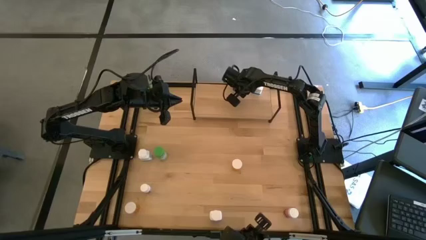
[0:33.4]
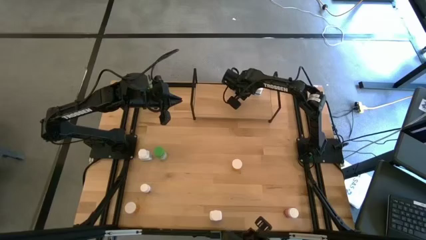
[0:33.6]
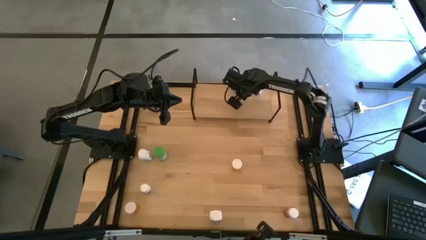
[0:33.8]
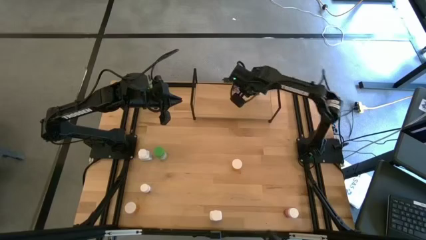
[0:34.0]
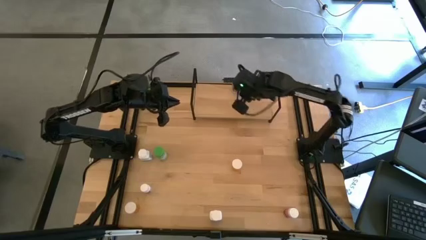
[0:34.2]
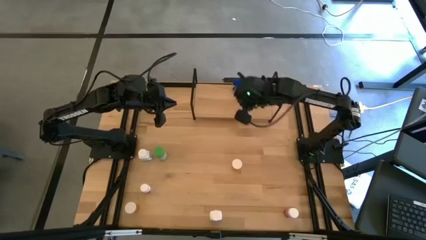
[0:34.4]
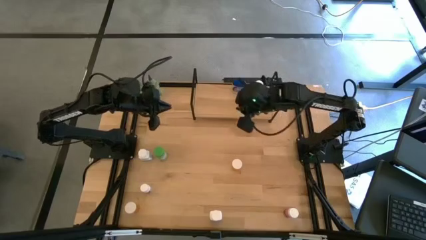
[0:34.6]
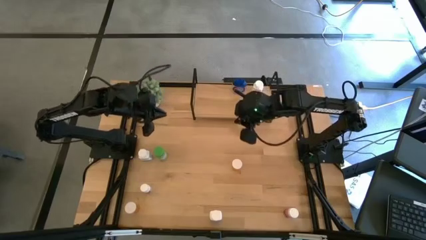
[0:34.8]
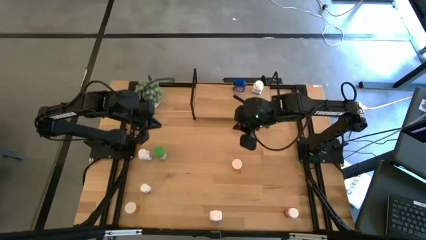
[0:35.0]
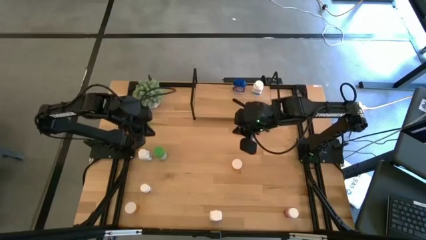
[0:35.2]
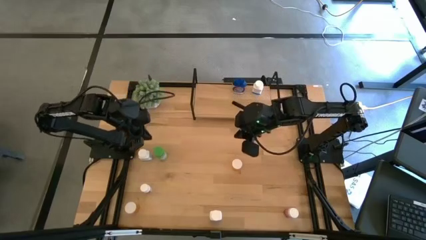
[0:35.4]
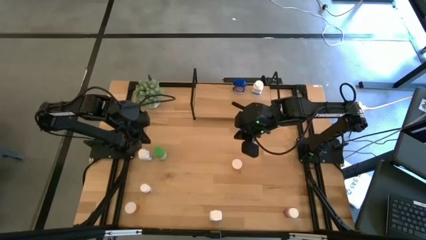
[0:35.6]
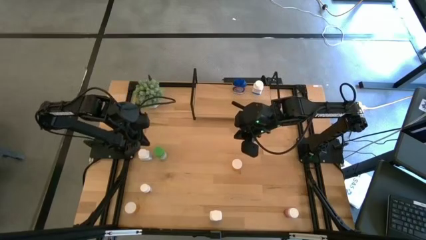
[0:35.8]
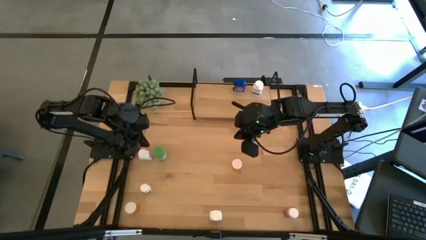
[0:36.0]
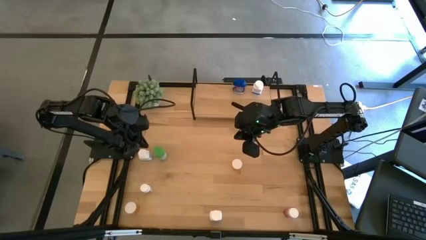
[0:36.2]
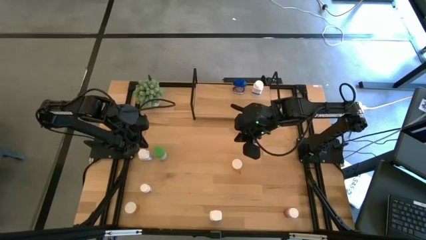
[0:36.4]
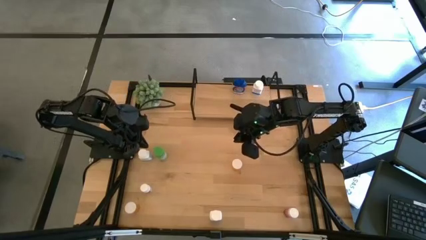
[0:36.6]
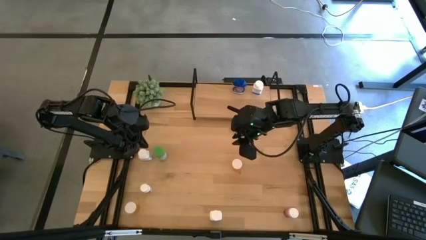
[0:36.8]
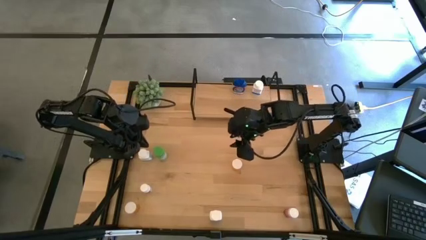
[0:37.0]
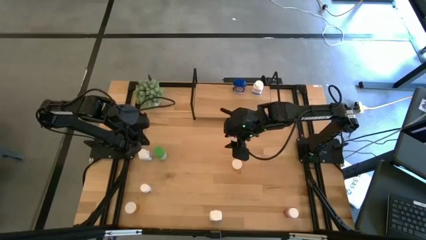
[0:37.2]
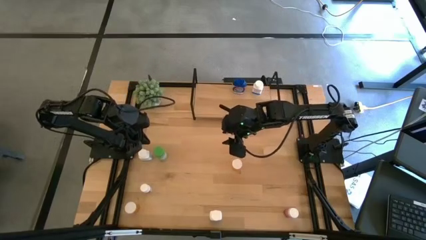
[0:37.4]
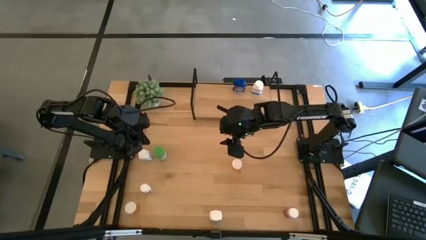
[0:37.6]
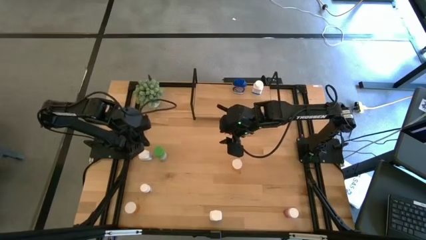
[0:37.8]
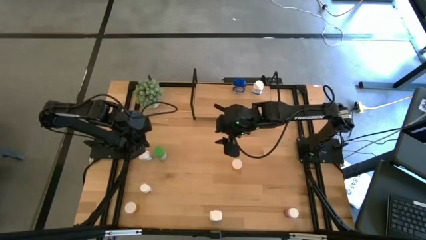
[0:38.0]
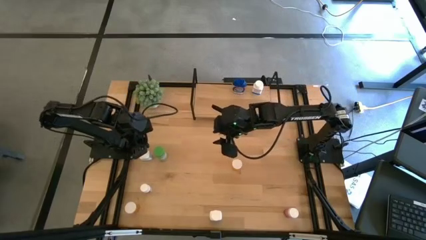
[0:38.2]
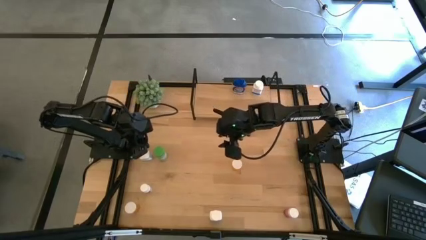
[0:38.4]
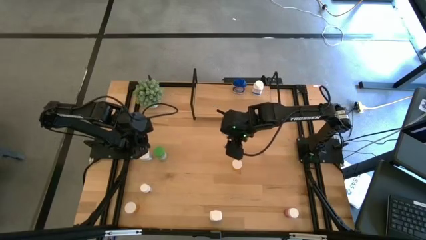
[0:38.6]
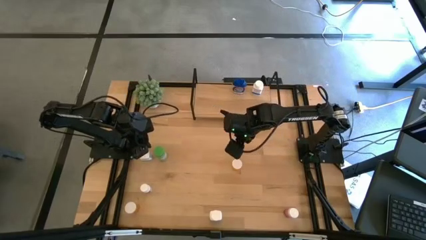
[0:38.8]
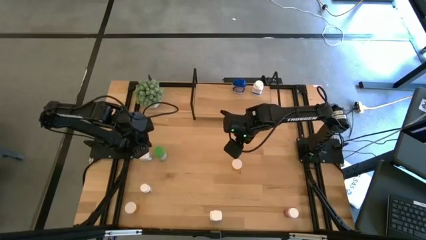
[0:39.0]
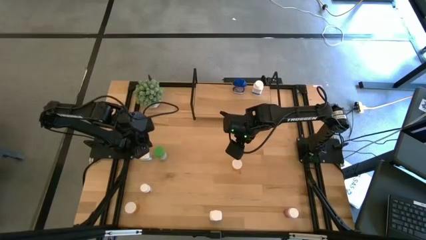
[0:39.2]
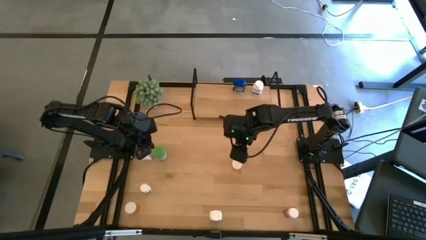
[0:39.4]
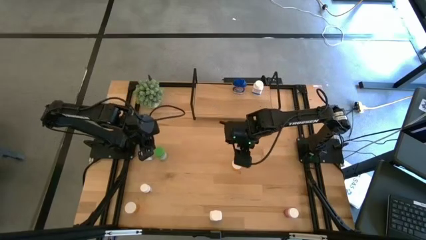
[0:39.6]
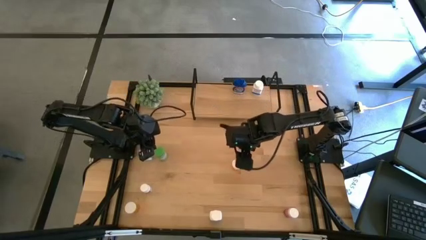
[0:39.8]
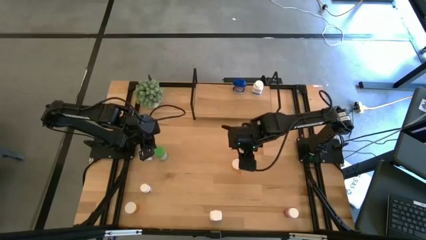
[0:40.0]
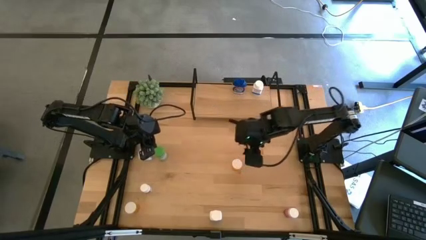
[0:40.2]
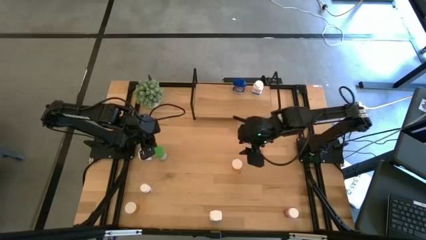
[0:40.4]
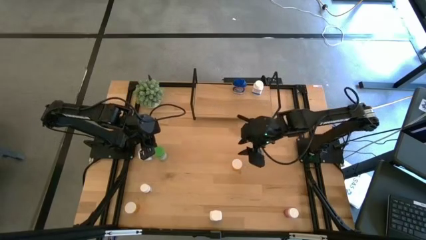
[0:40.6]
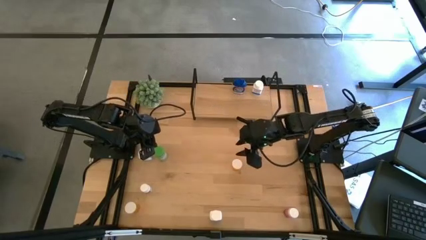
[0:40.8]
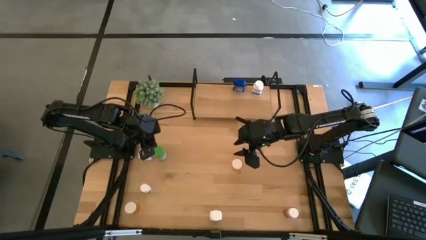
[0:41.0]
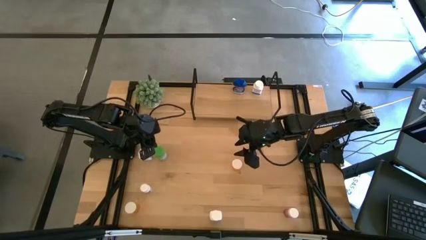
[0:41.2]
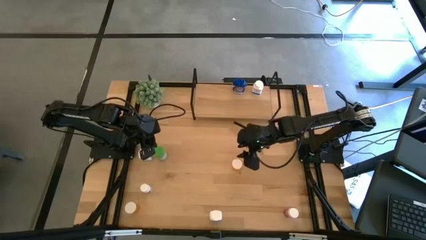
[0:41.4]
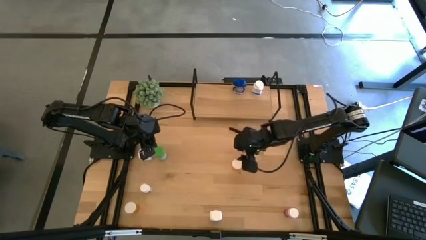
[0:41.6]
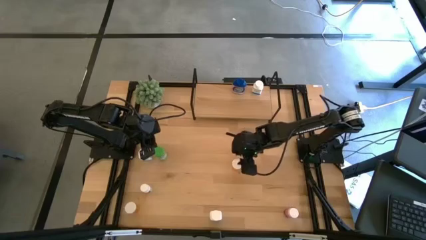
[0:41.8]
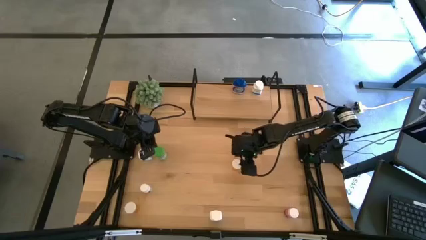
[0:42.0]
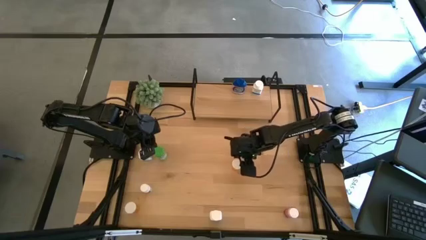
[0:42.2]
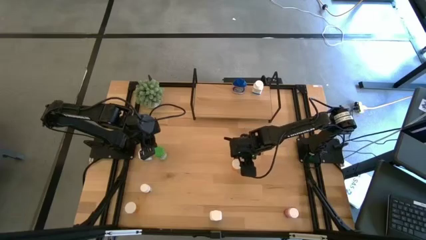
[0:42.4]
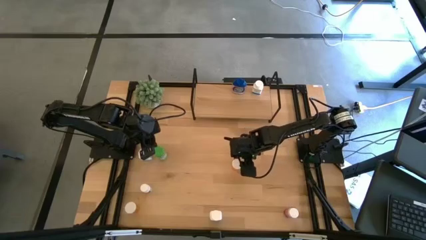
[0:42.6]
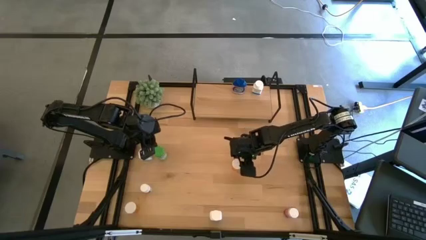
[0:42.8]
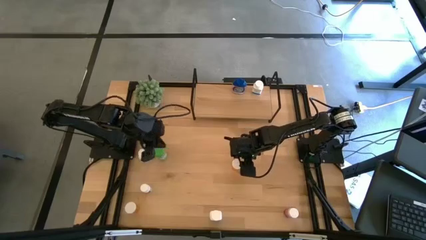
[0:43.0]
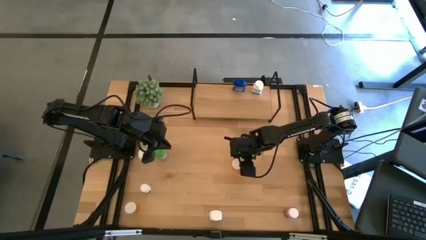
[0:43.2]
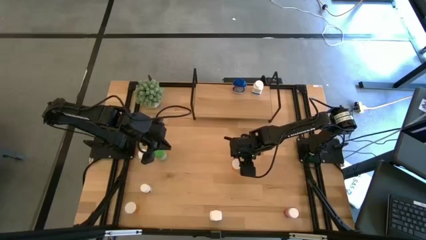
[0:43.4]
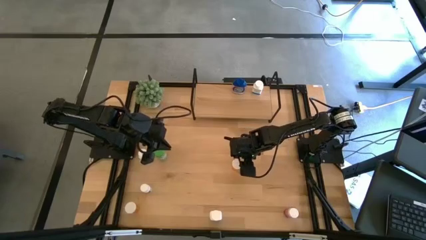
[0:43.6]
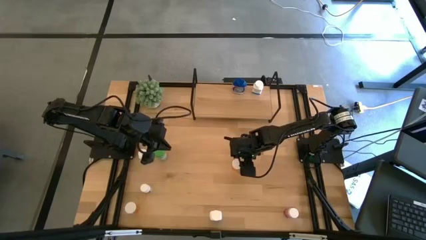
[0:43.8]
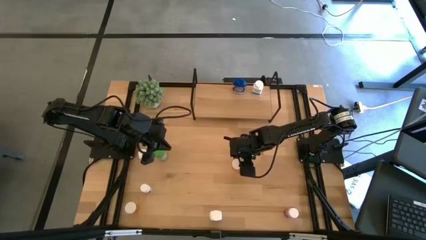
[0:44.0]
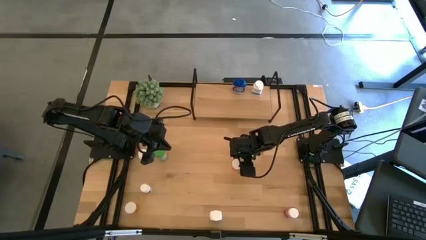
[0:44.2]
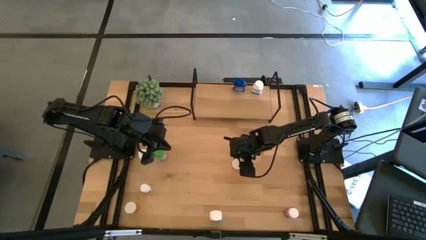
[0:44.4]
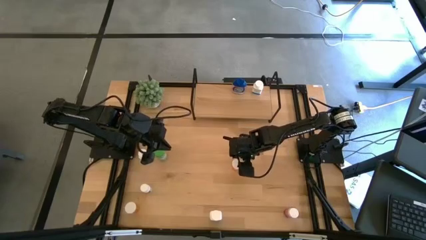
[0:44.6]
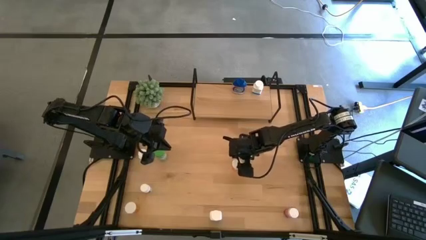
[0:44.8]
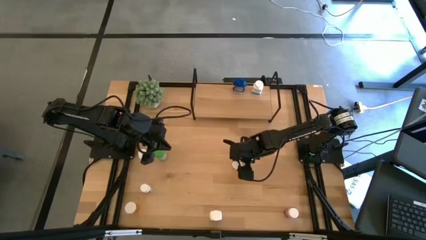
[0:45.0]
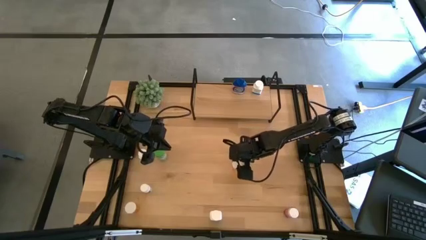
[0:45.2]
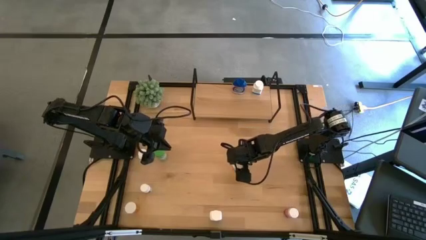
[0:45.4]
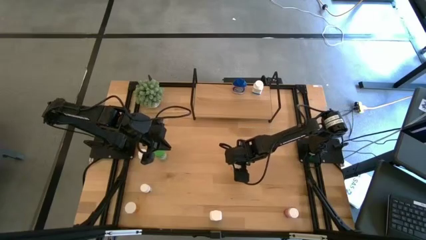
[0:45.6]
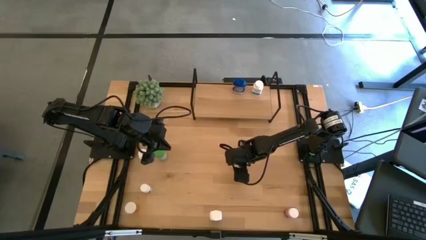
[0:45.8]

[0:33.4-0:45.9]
Task: Pick and place medicine bottles onto shelf by color
Put the top orange pill bottle on the shelf
